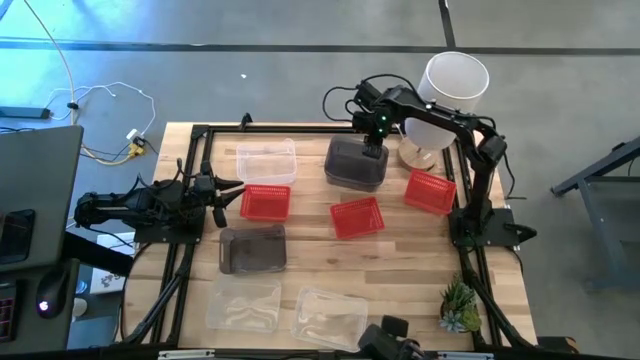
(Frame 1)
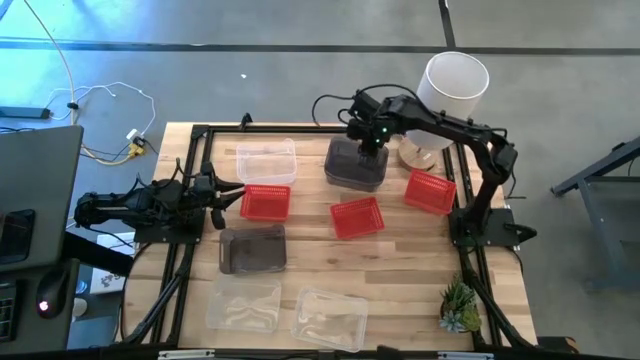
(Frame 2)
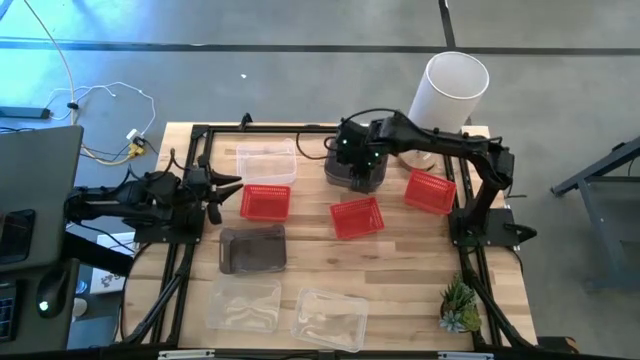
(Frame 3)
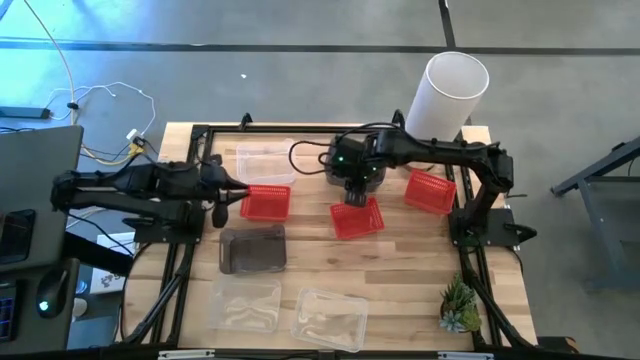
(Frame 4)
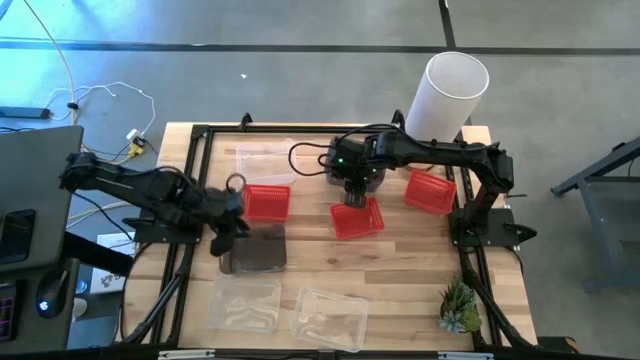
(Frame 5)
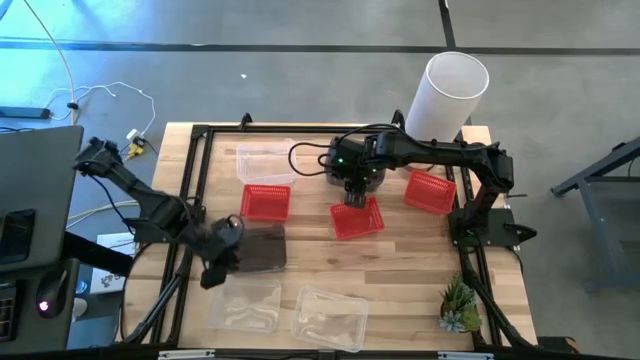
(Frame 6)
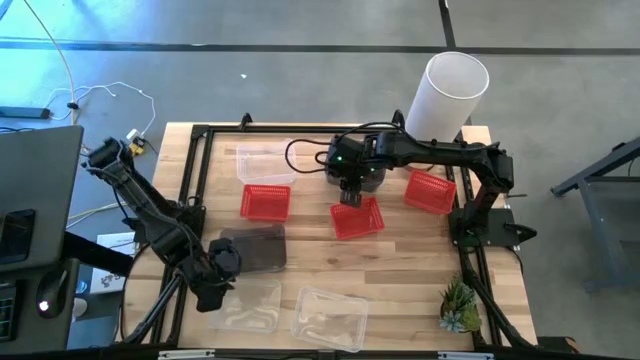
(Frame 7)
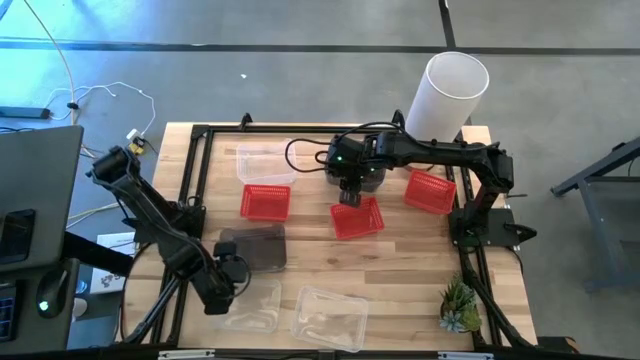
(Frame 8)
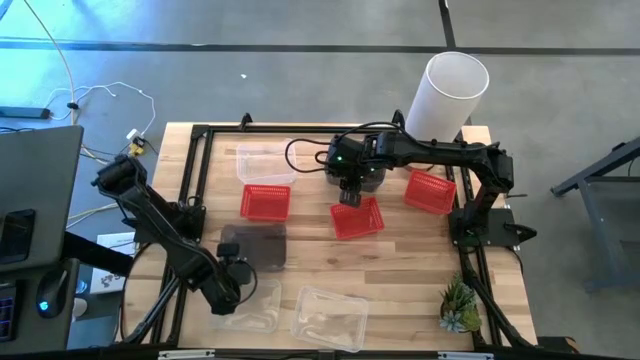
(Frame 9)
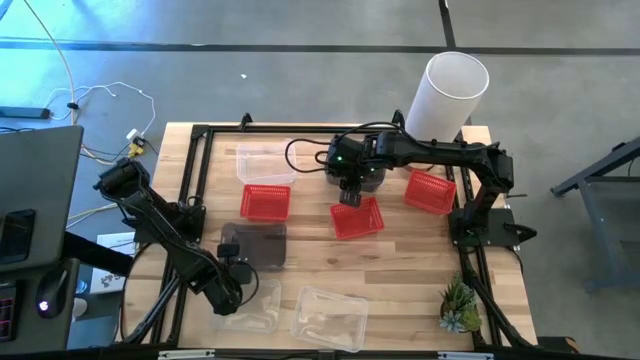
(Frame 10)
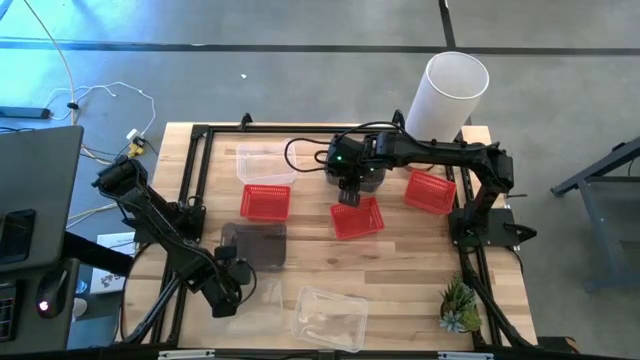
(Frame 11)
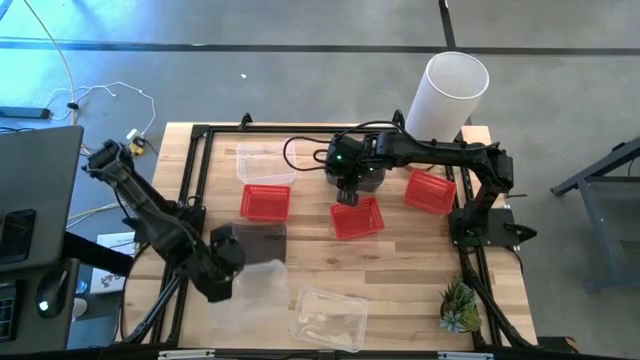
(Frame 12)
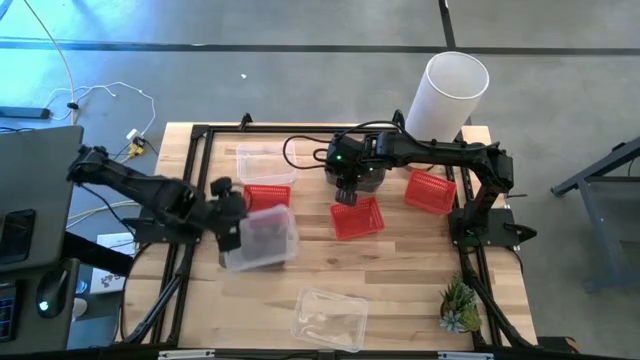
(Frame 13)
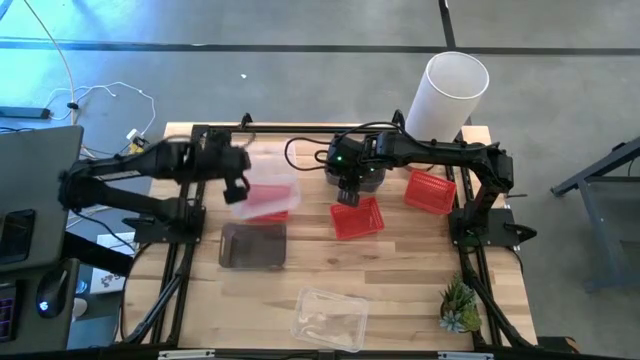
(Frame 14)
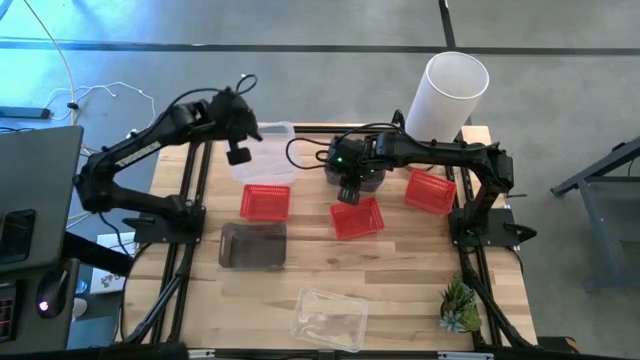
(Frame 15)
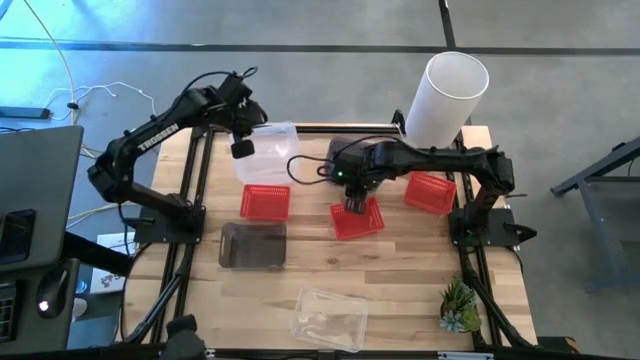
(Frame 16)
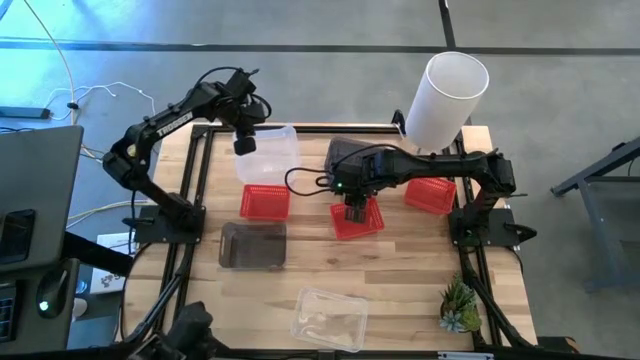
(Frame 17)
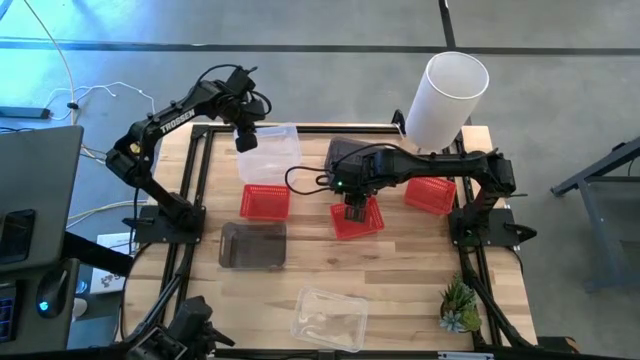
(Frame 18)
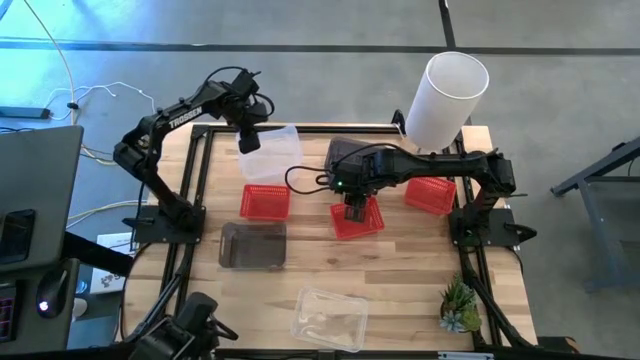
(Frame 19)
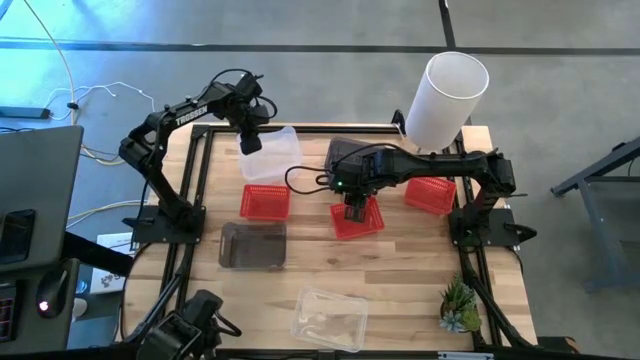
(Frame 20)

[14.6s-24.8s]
Stack the bottom left transparent bin on the top transparent bin

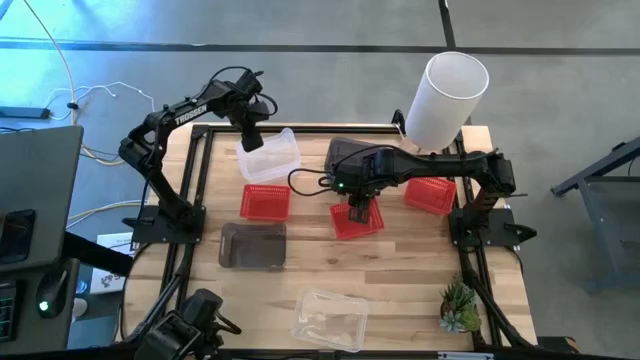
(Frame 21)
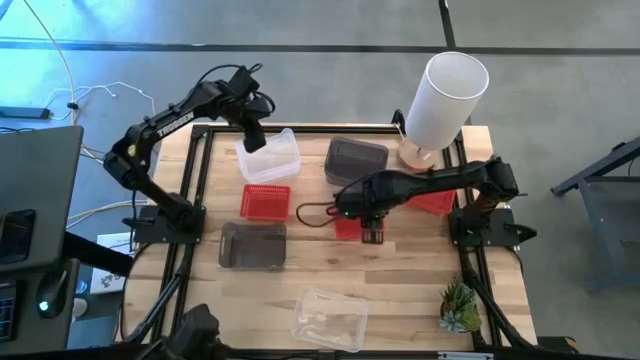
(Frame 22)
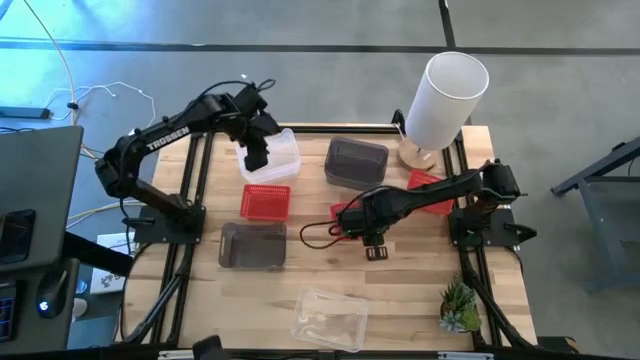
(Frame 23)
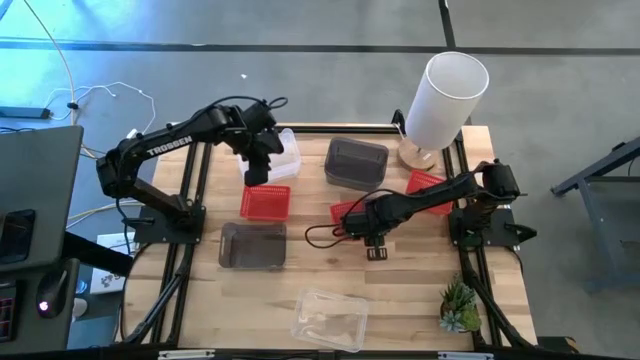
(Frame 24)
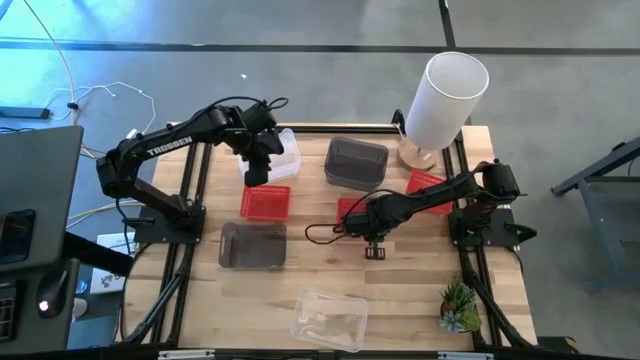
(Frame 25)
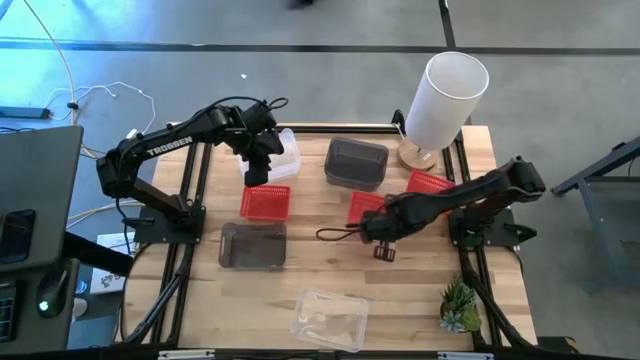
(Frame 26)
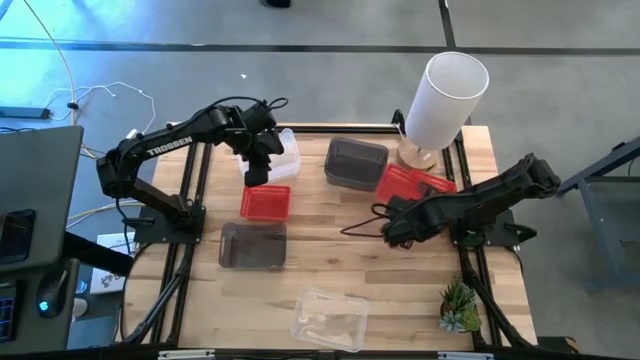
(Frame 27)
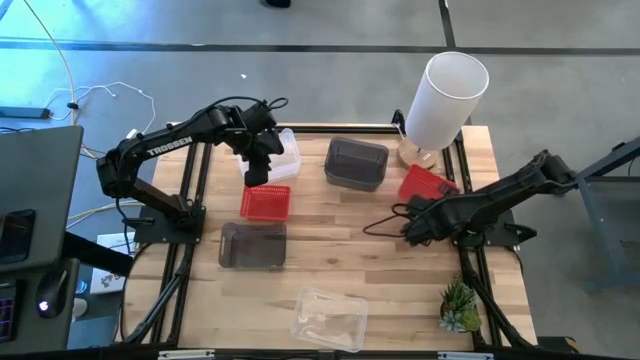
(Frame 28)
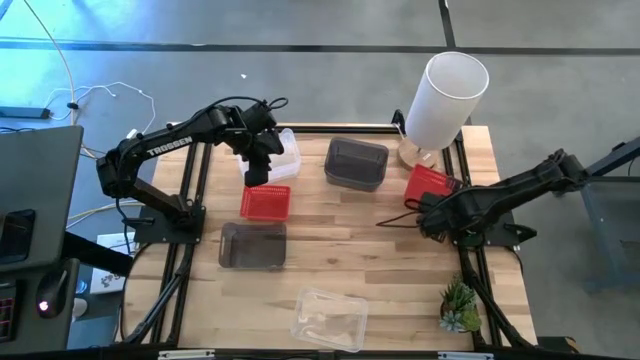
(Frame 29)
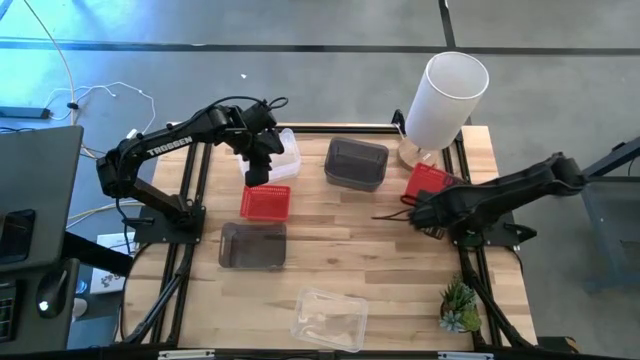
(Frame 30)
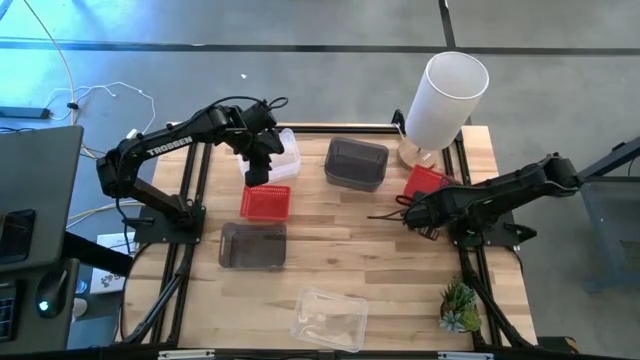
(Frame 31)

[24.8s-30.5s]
Stack the middle red bin on the right red bin
